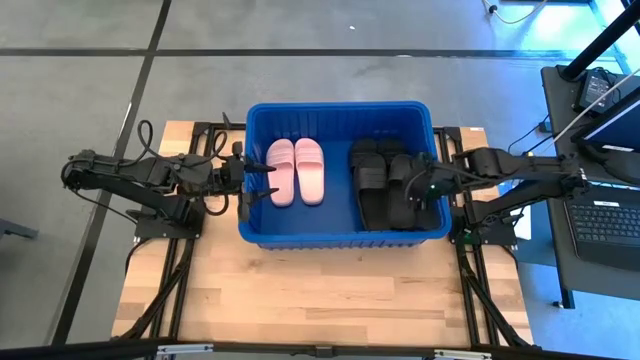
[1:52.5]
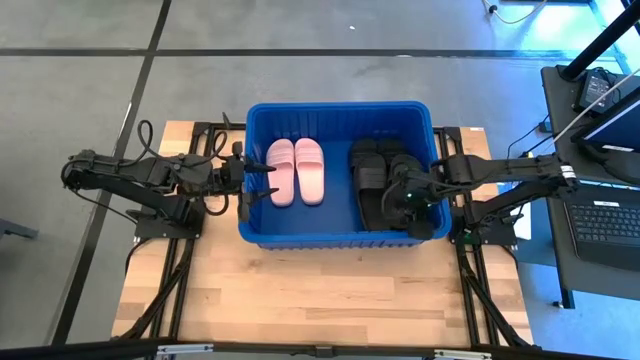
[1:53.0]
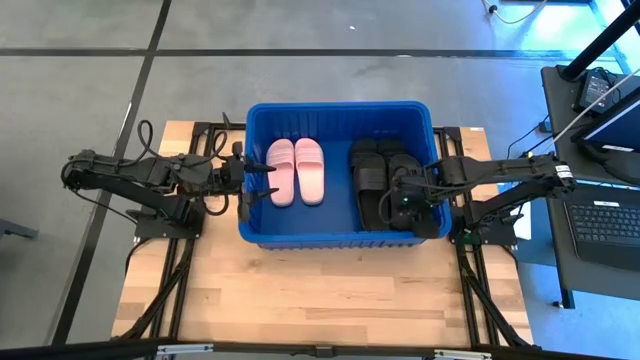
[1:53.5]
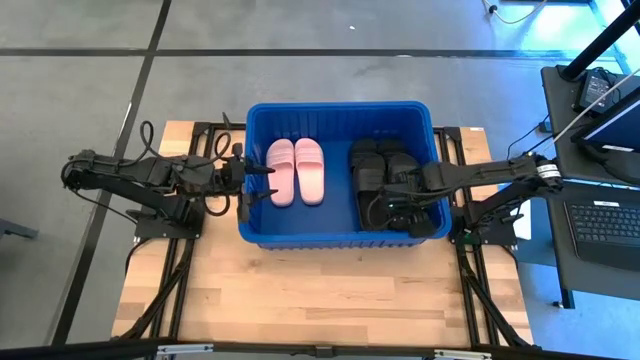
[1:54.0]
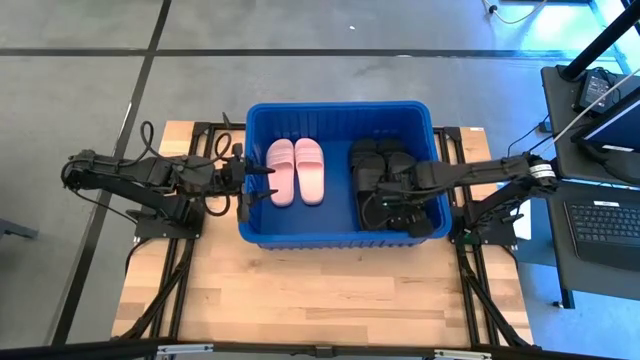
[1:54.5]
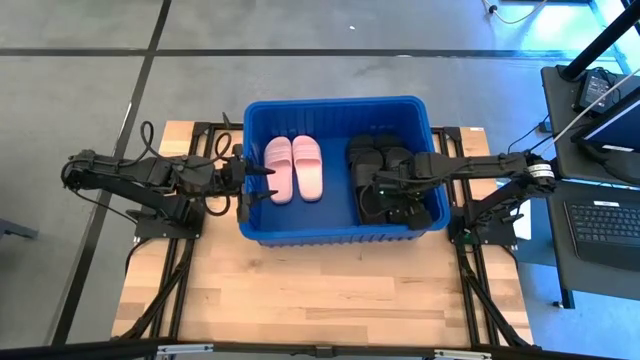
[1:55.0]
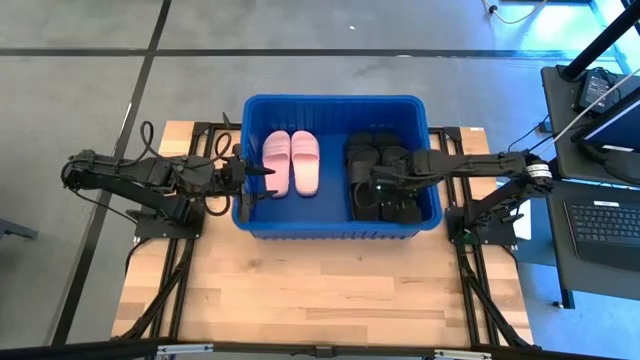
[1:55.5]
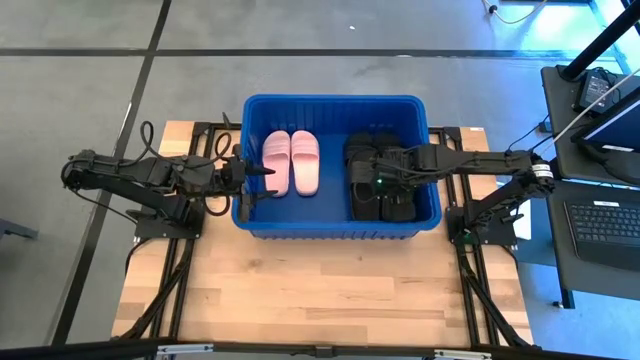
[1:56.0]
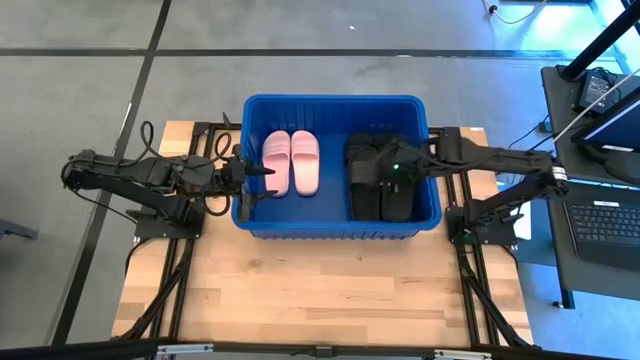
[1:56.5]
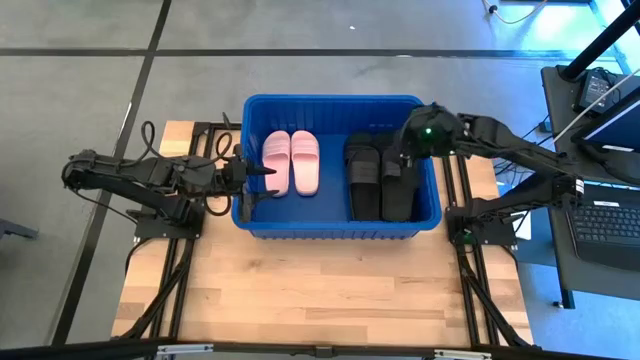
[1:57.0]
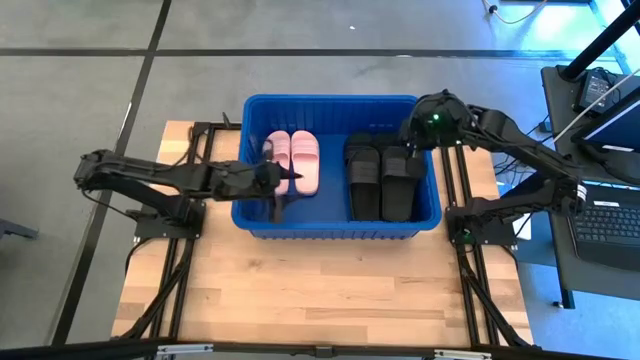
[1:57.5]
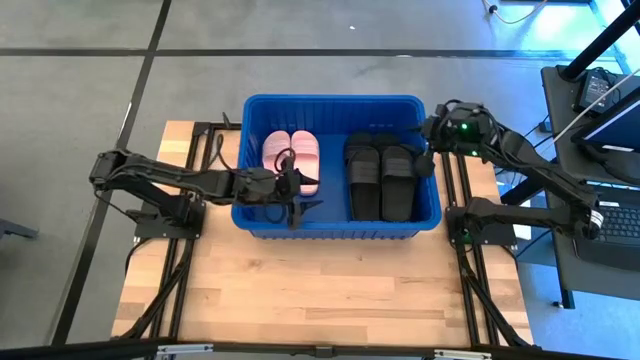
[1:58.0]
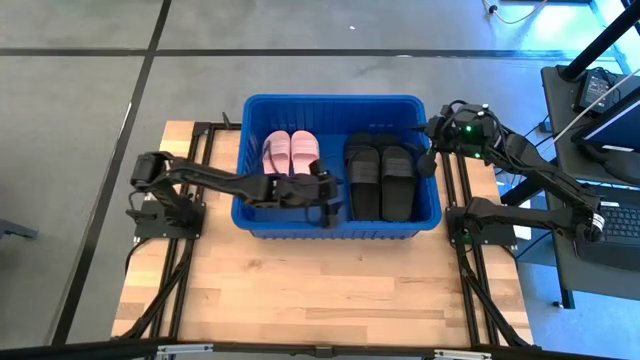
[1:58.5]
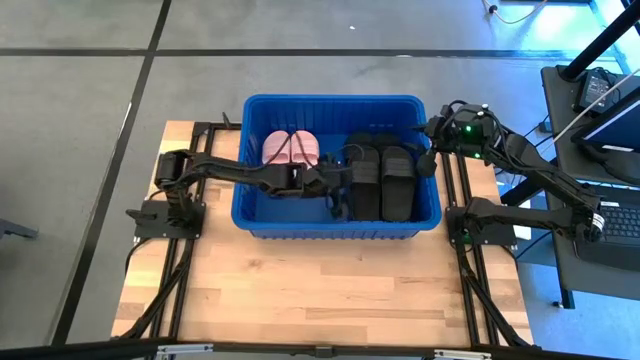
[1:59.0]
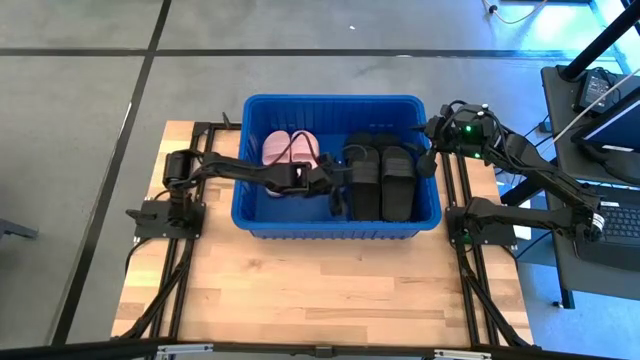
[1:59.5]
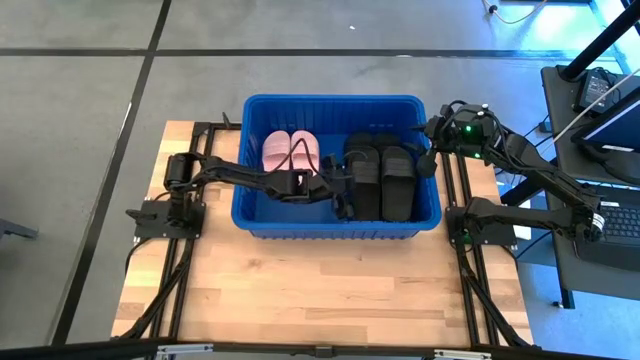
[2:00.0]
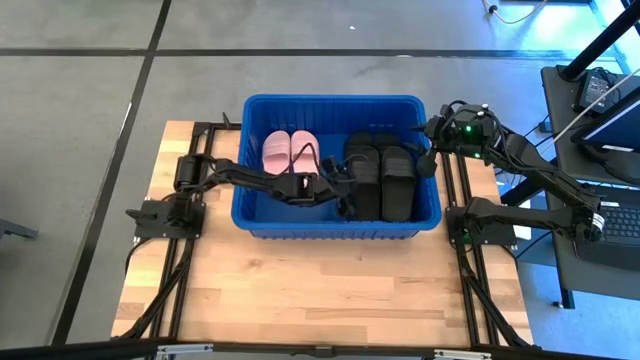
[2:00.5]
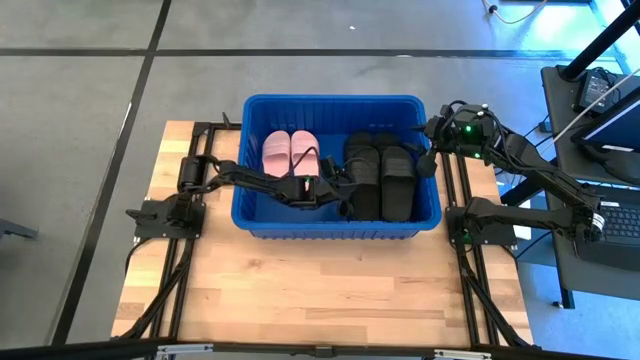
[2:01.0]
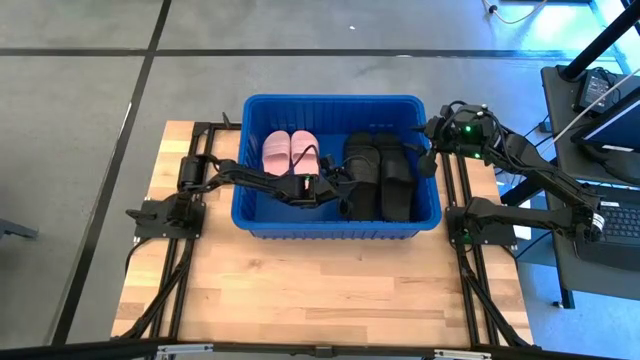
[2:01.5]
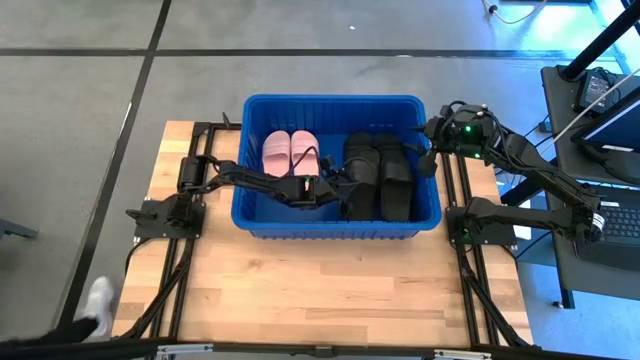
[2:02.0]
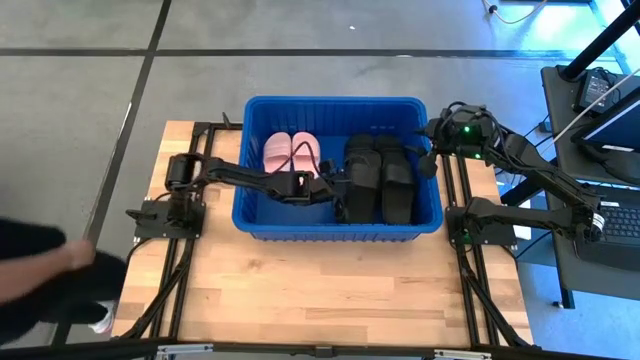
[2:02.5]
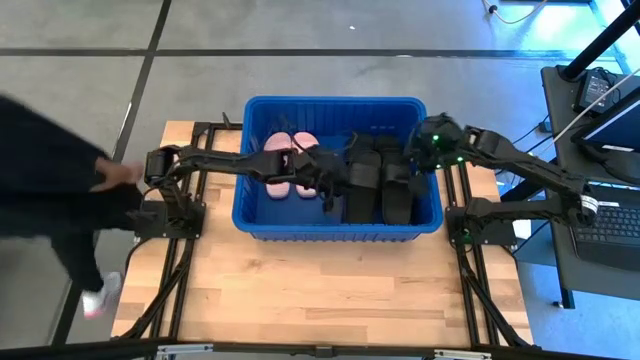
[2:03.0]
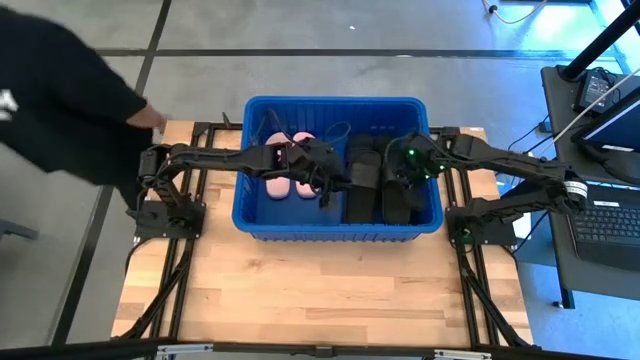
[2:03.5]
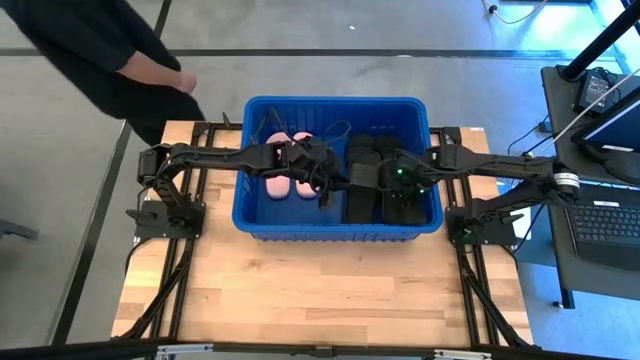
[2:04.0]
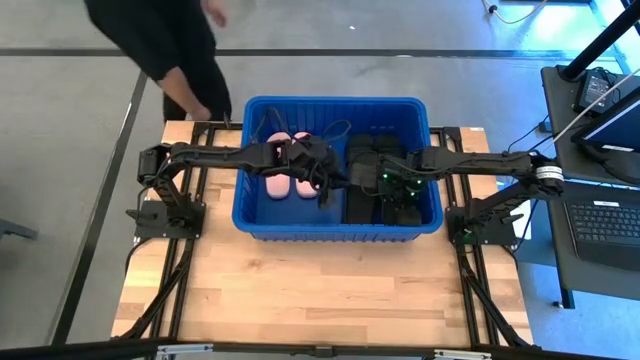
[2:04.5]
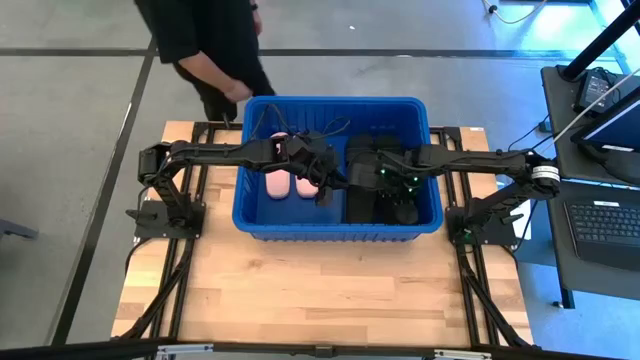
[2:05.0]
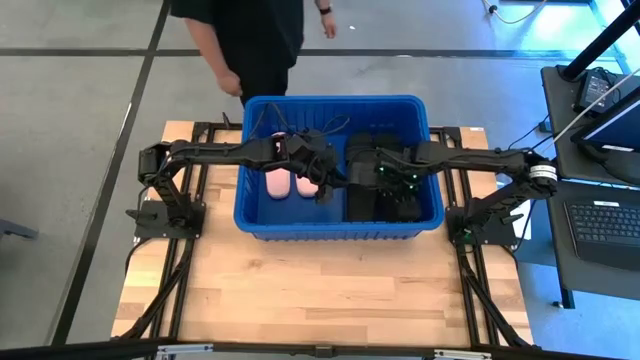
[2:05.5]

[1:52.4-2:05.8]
Task: Pick and place slides into bin
Adjust the black slippers in the blue bin

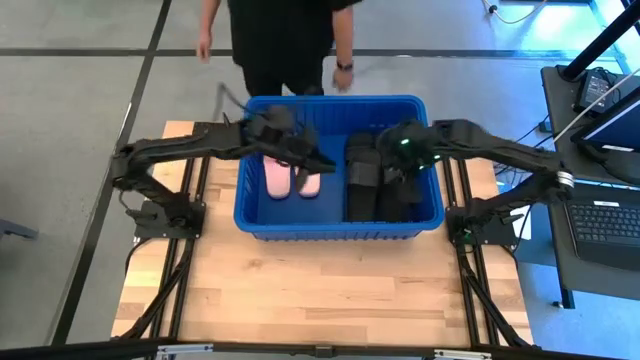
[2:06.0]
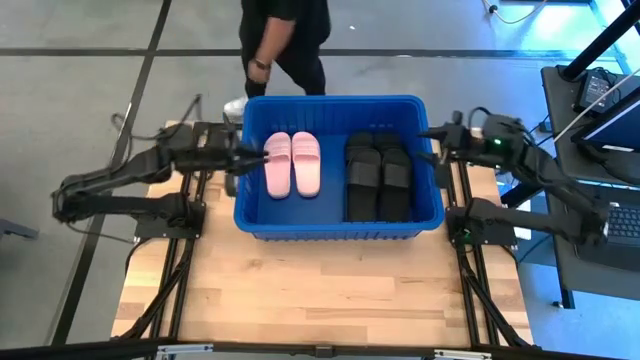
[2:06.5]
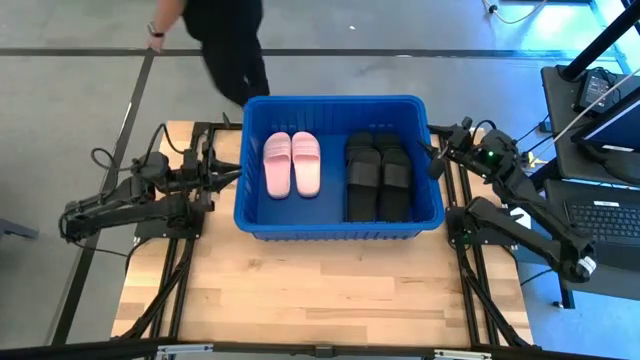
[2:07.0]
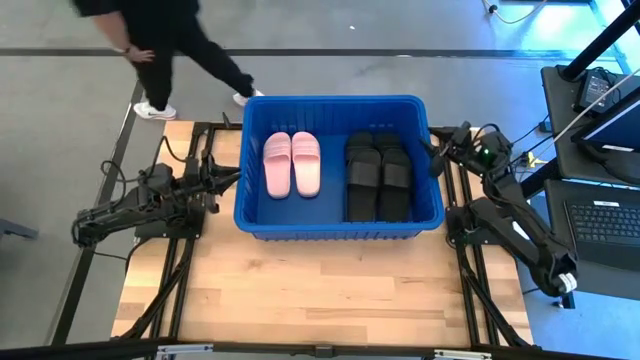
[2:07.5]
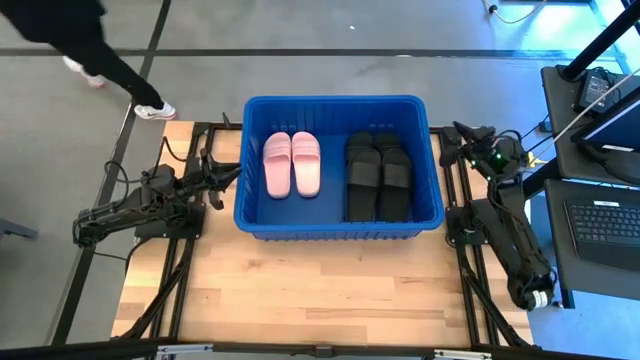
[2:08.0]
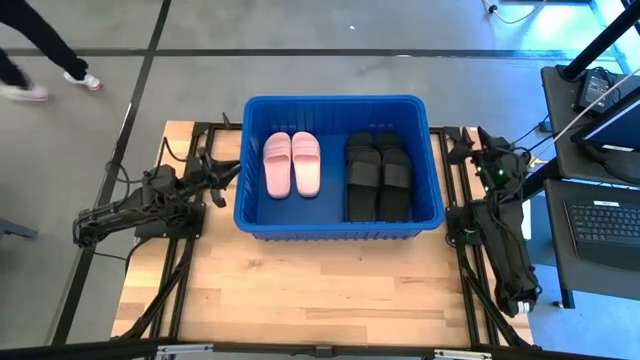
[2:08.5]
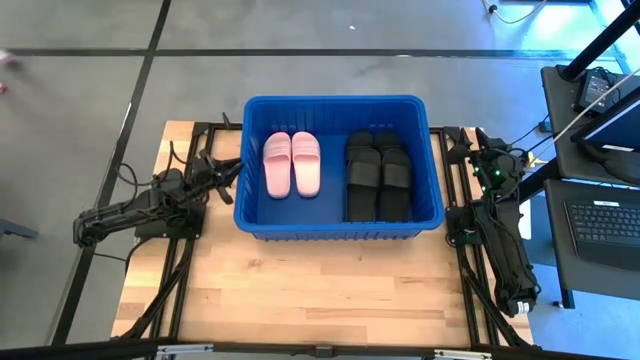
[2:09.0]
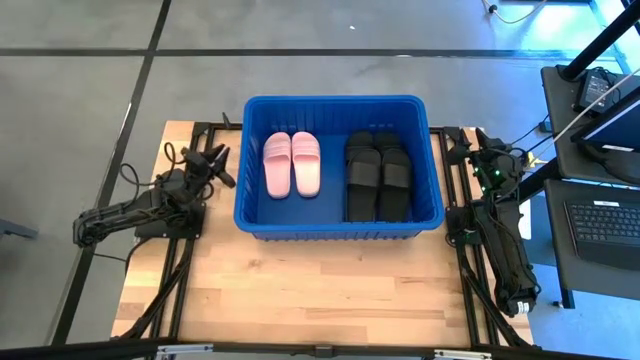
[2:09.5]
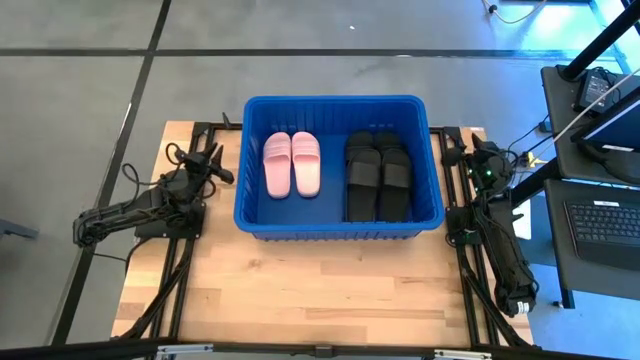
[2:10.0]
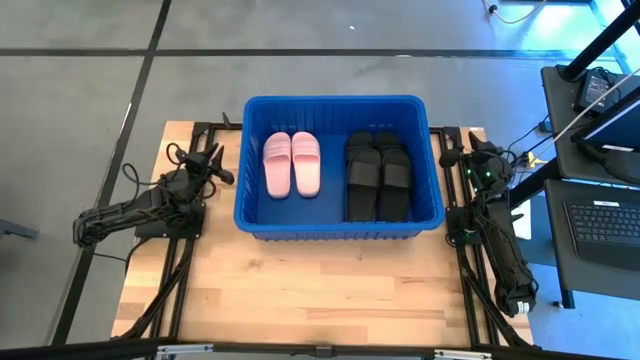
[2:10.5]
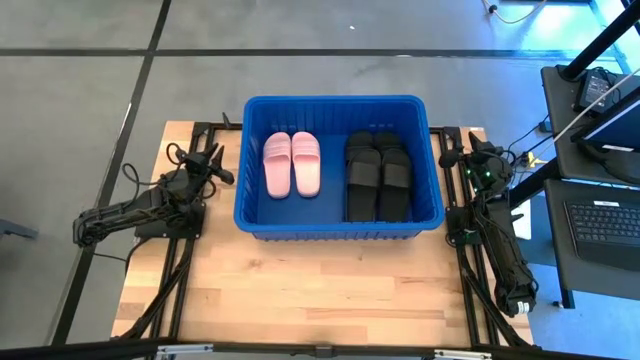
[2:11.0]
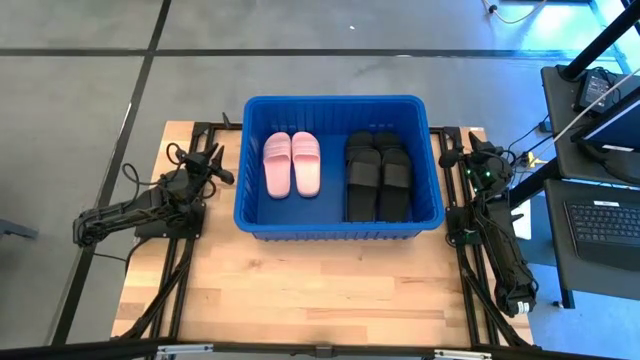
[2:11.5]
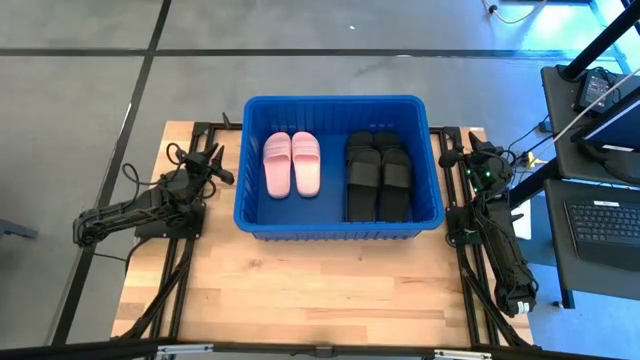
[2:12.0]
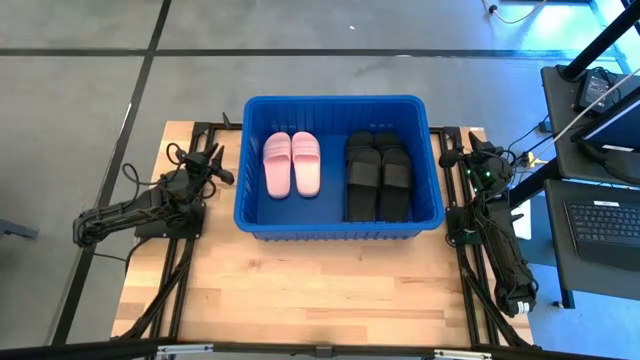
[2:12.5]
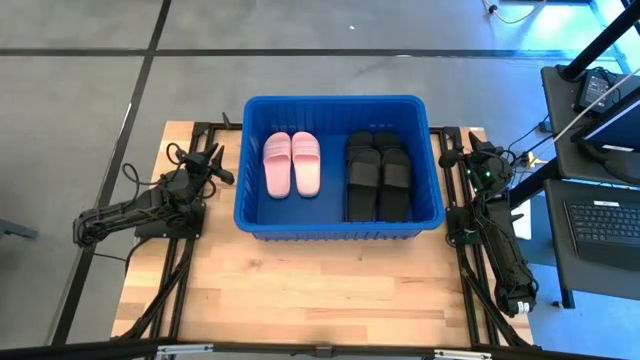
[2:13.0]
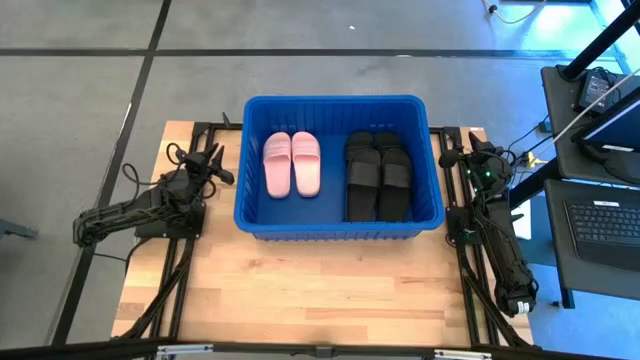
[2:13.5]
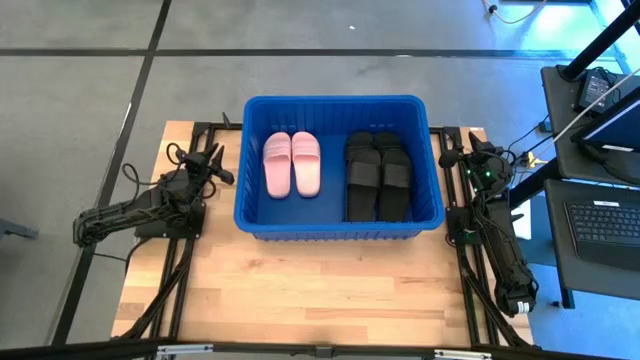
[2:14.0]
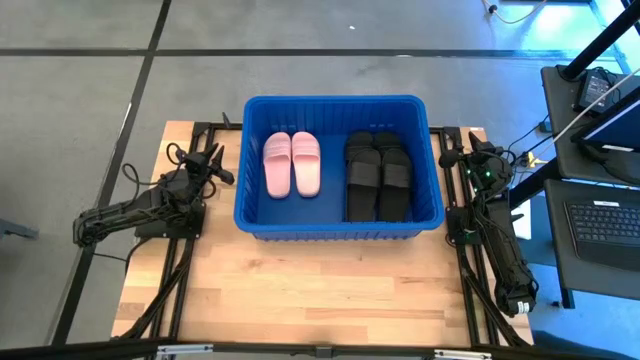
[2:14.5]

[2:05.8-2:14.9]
Return to Home Position
